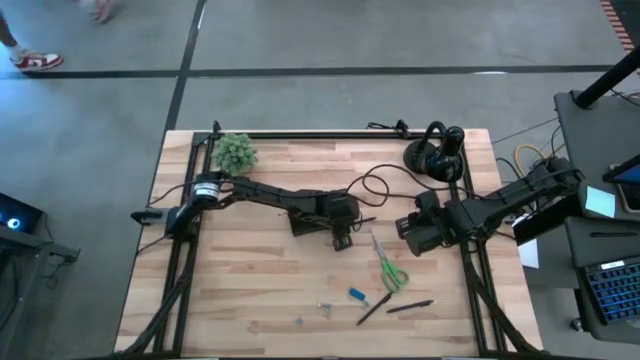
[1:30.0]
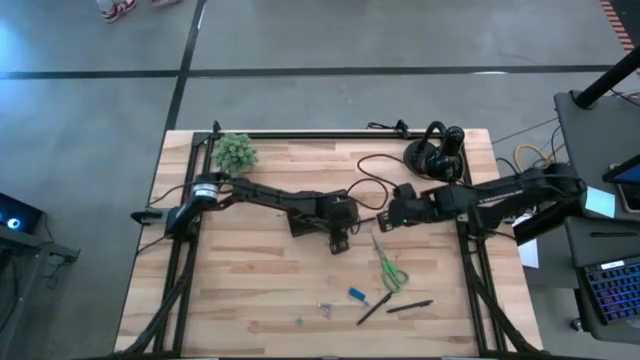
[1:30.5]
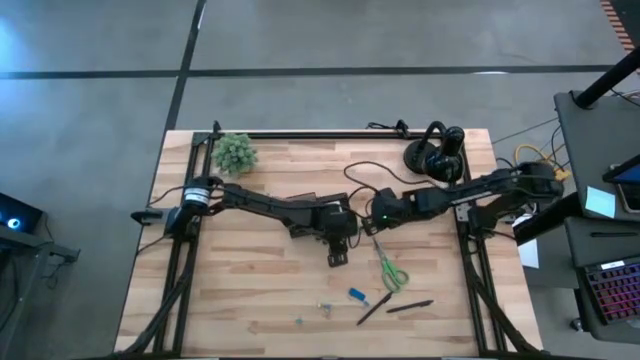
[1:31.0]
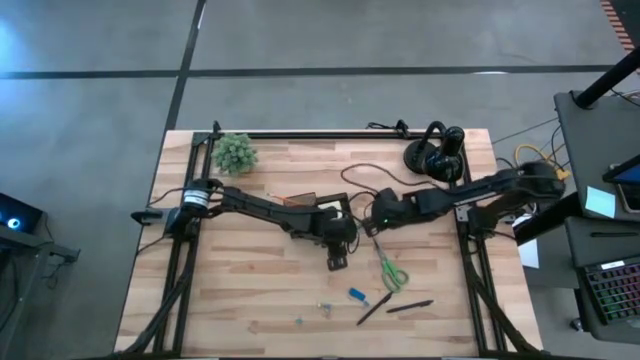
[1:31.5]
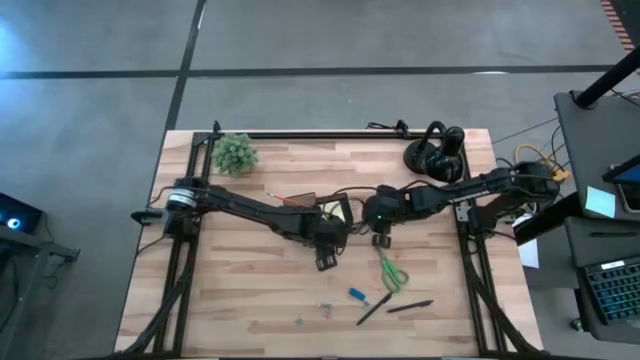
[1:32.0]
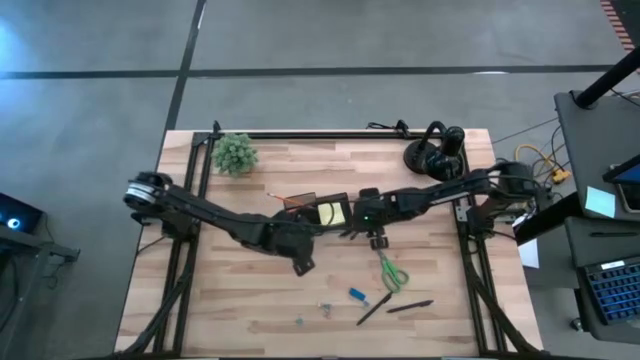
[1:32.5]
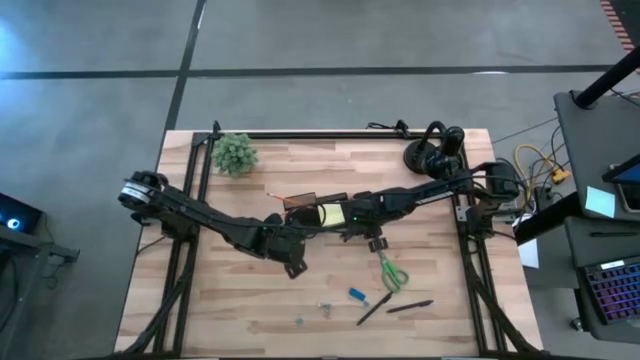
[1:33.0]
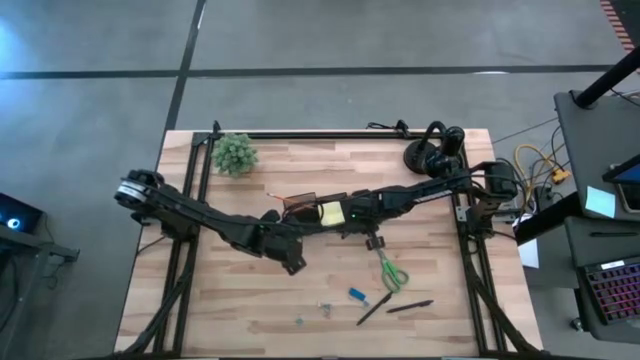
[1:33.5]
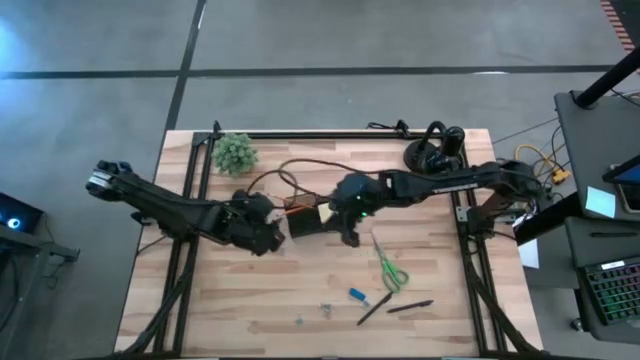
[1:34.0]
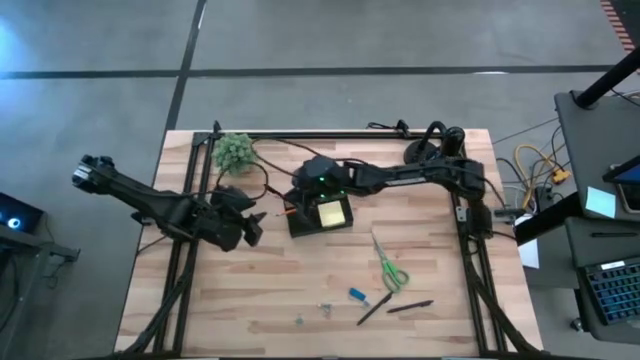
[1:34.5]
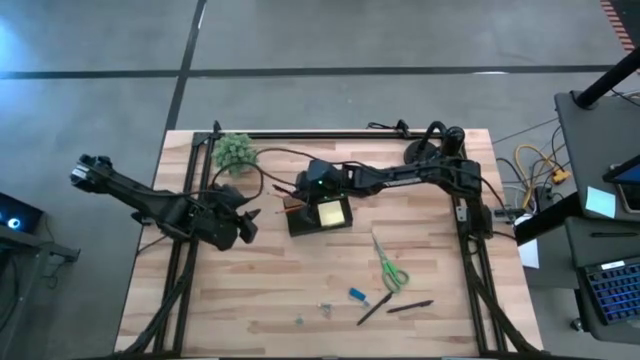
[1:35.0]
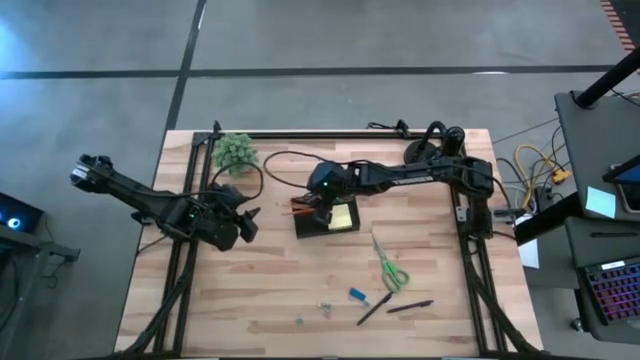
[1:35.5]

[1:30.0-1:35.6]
Task: Pick and place office supplies into organizer
Put the top black pen into the black desk organizer

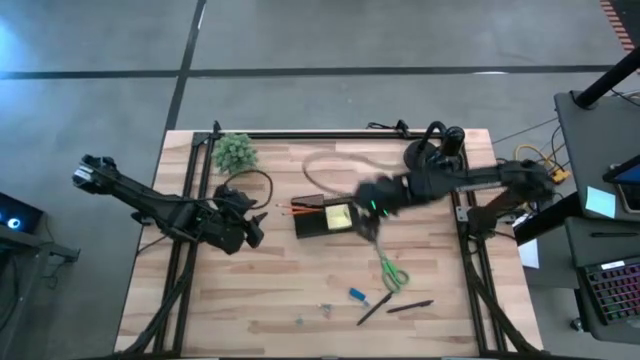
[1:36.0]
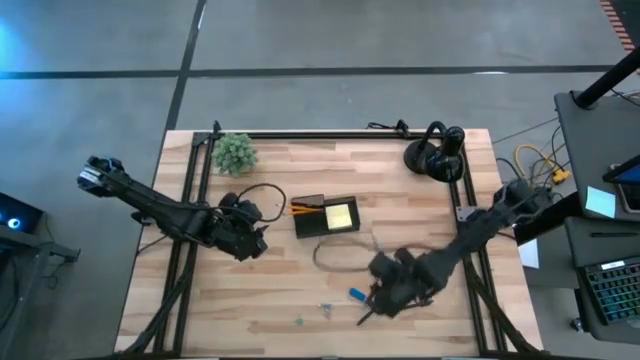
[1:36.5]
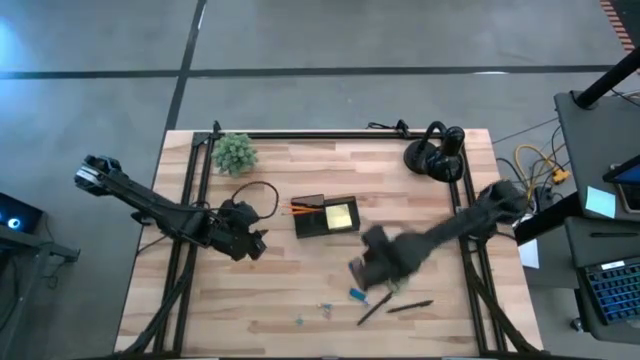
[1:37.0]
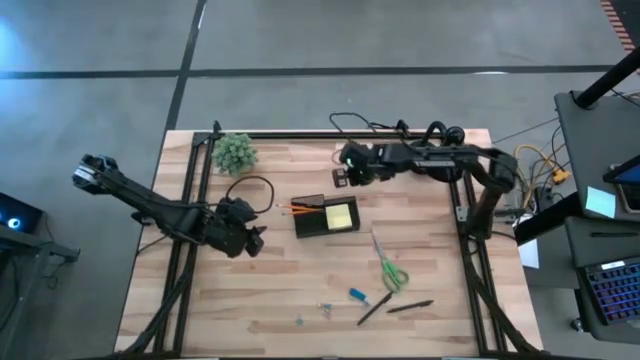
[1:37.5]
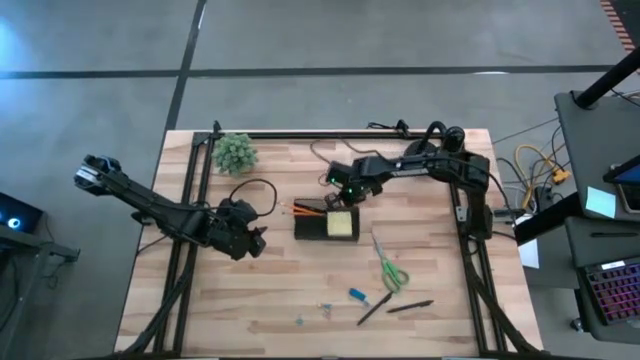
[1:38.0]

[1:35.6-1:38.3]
Adjust the black desk organizer

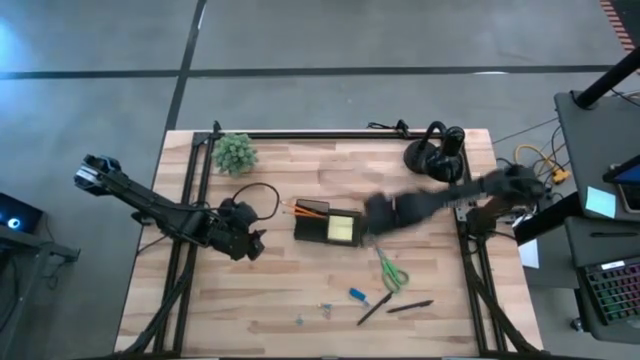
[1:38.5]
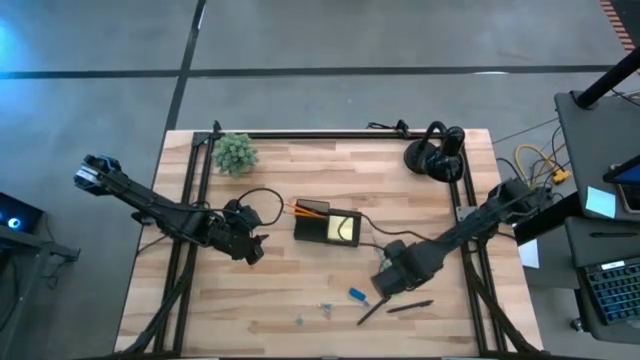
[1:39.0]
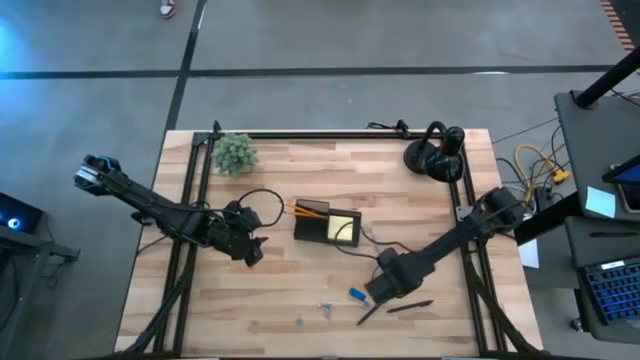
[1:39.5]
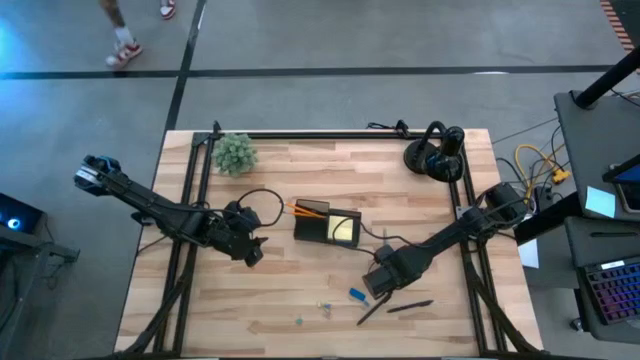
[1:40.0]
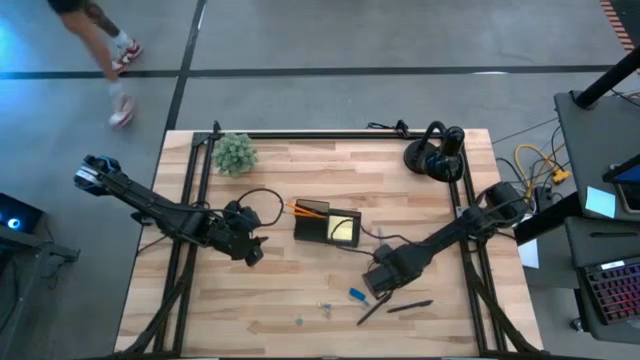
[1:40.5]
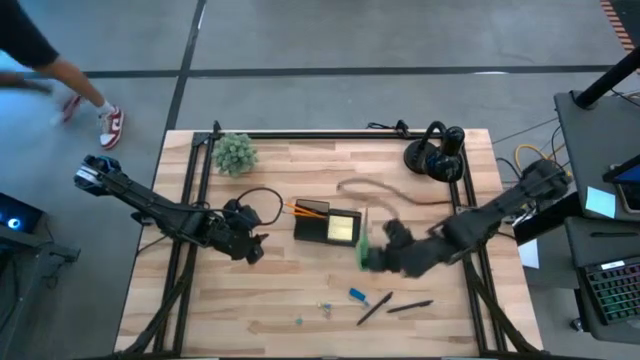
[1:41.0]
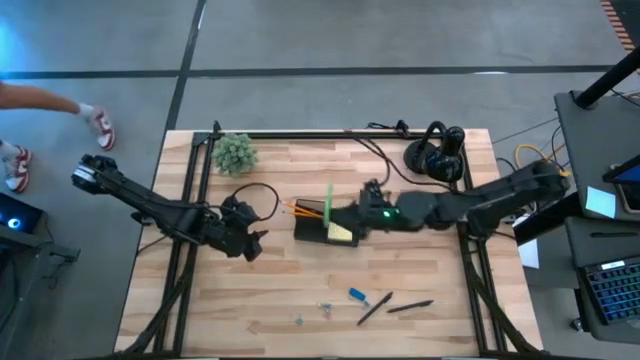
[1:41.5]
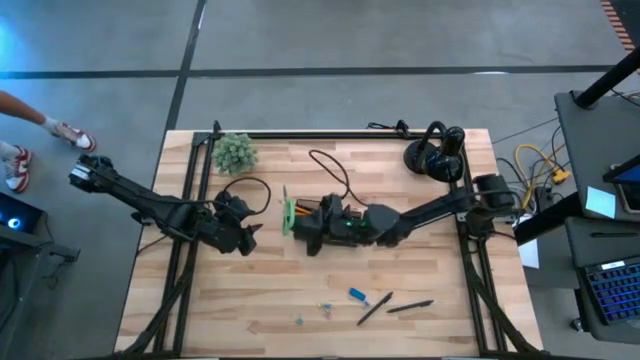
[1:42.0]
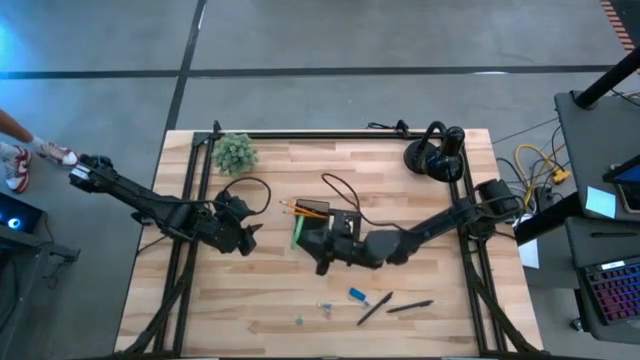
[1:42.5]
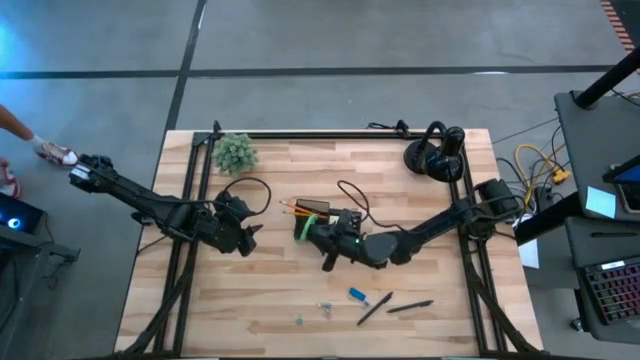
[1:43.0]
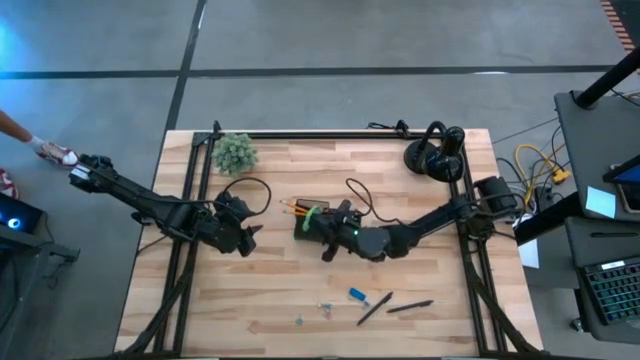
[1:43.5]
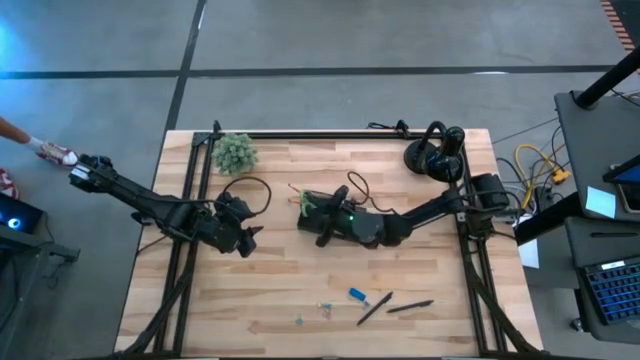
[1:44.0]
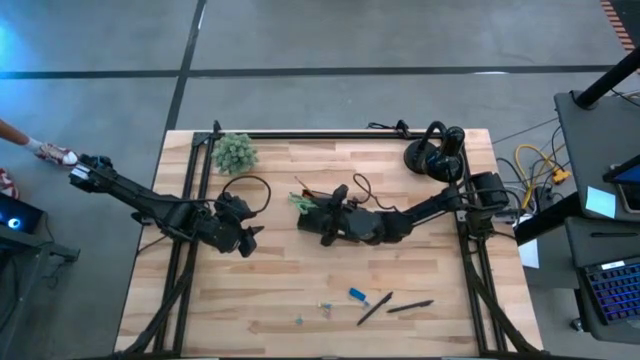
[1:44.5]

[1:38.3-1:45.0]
Put the green scissors into the black desk organizer

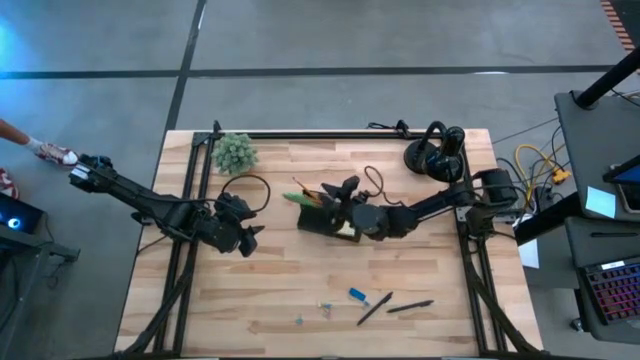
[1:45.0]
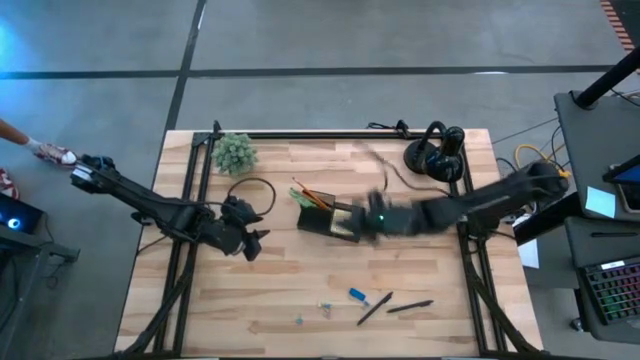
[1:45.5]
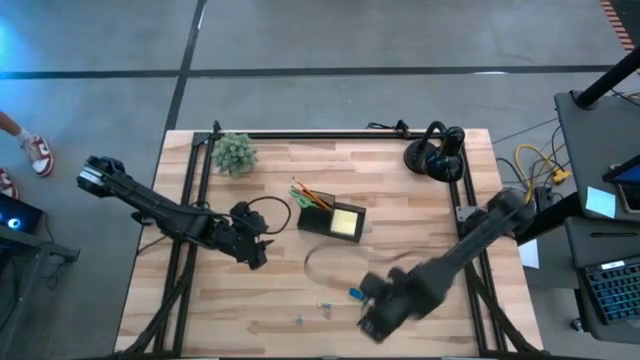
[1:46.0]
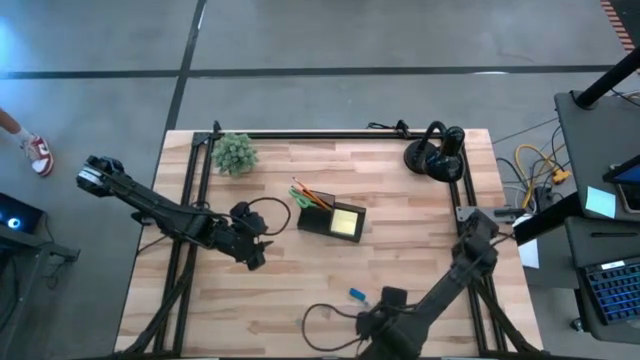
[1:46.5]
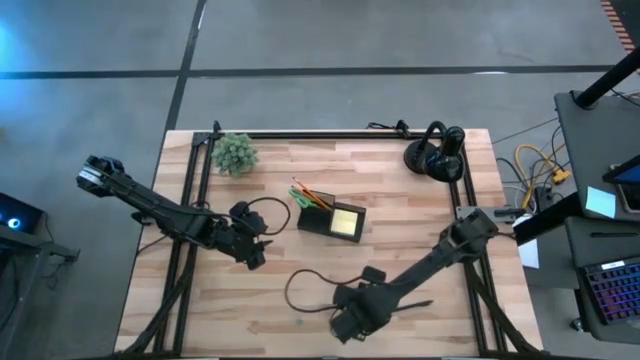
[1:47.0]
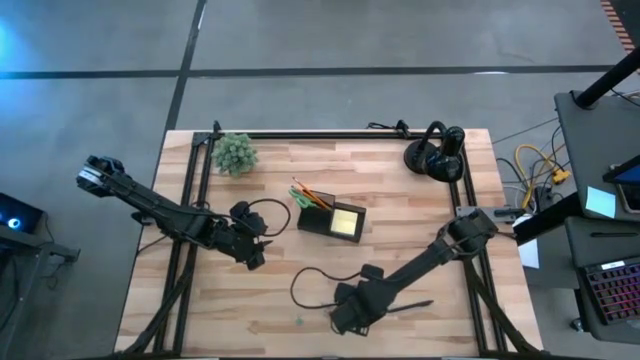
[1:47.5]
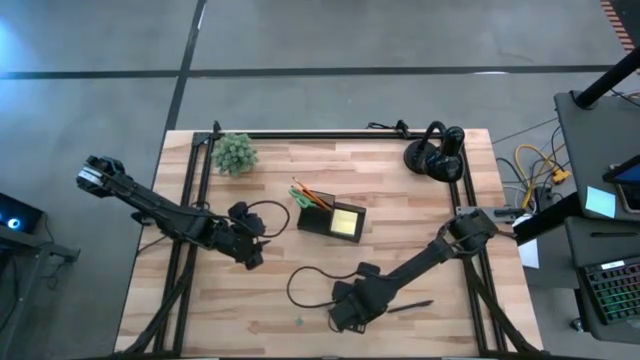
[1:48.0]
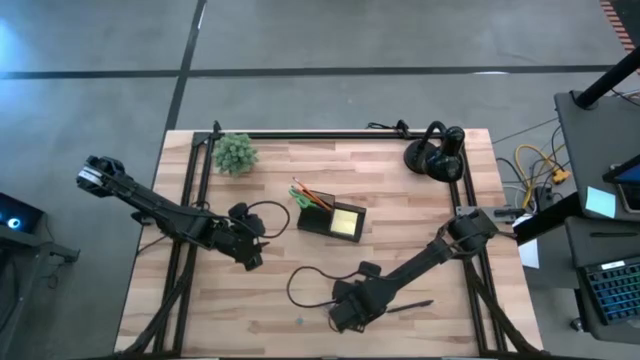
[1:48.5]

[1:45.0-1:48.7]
Put the blue eraser into the black desk organizer

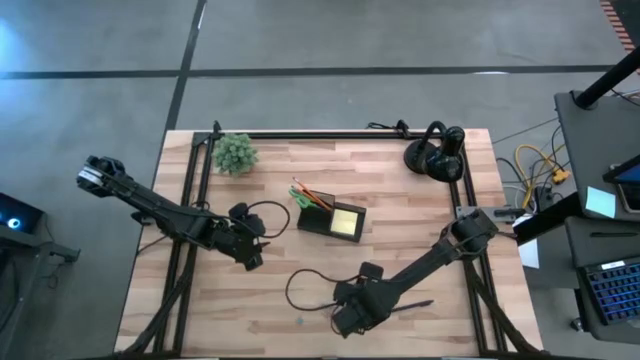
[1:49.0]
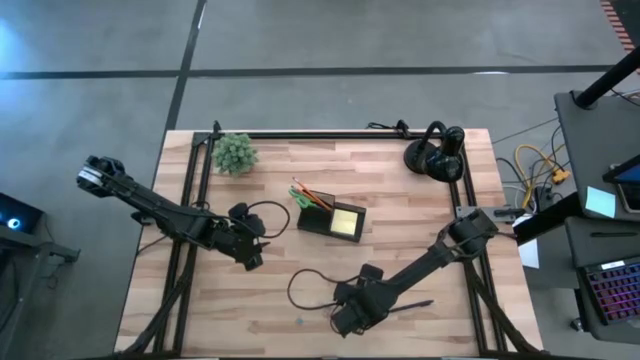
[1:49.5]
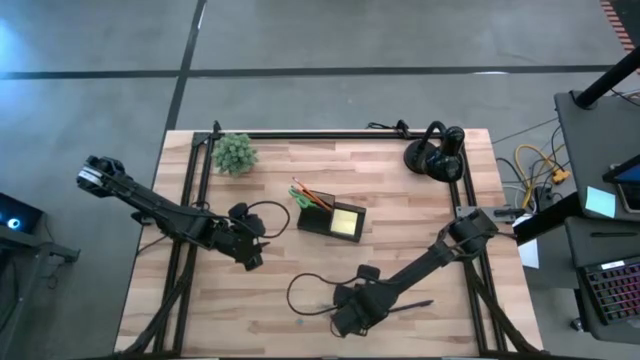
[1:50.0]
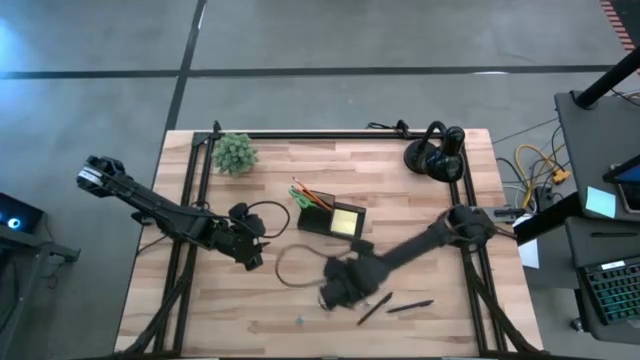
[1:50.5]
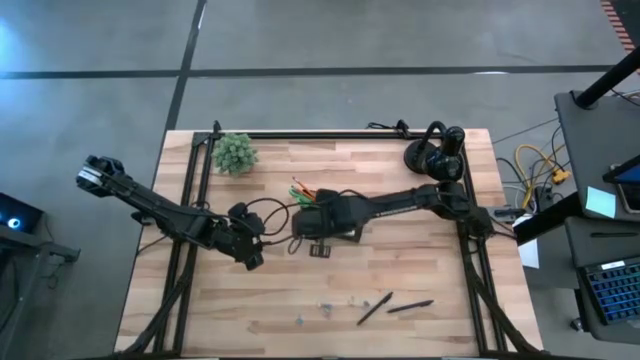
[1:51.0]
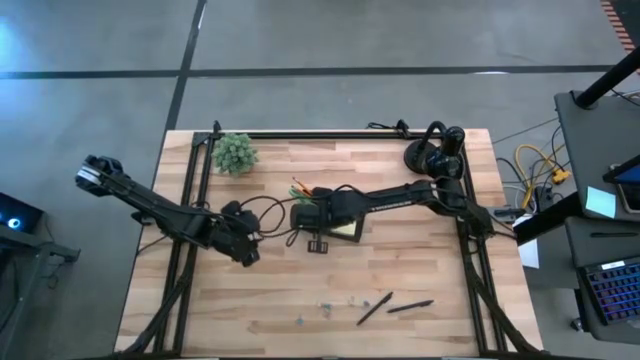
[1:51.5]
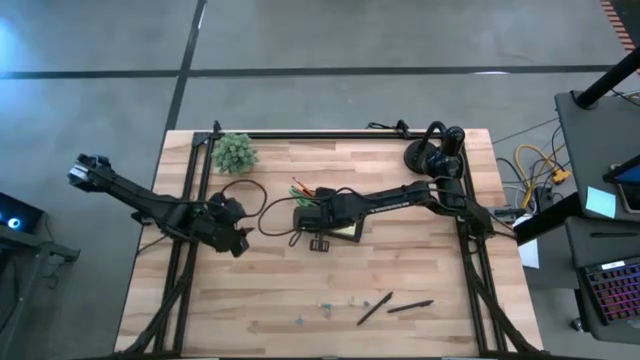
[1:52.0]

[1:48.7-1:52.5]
Put the blue eraser into the black desk organizer
